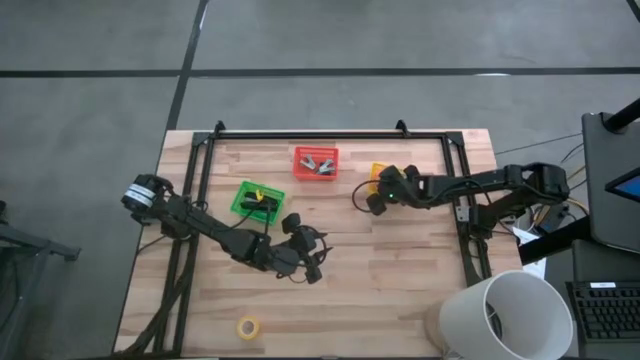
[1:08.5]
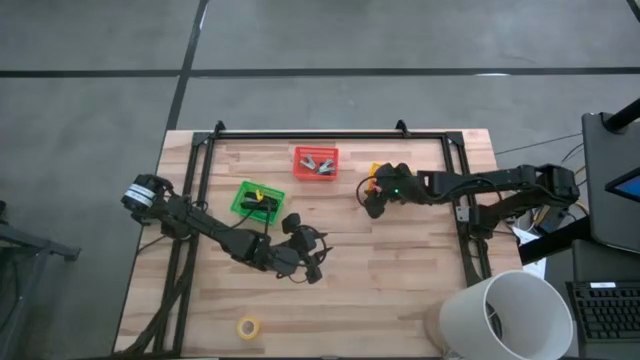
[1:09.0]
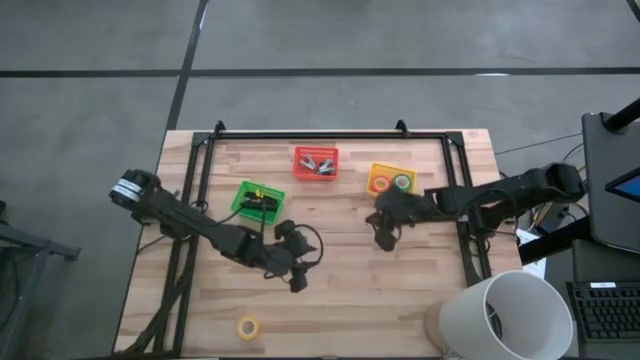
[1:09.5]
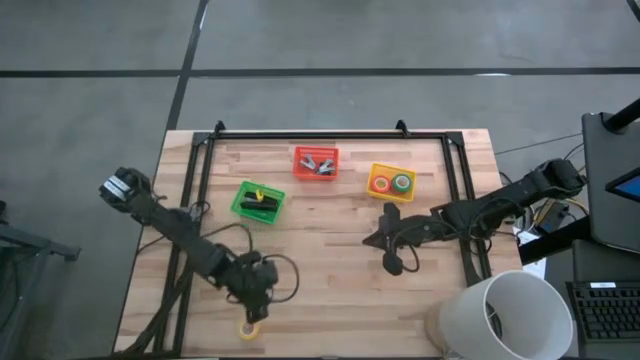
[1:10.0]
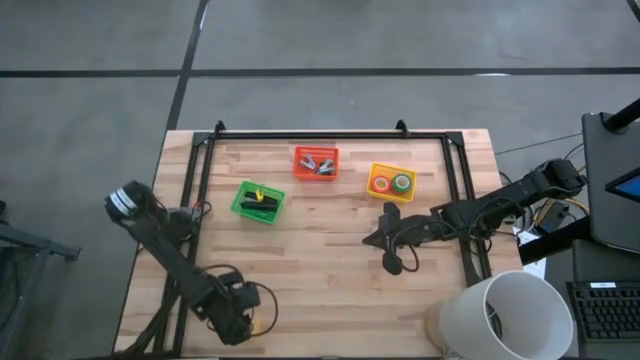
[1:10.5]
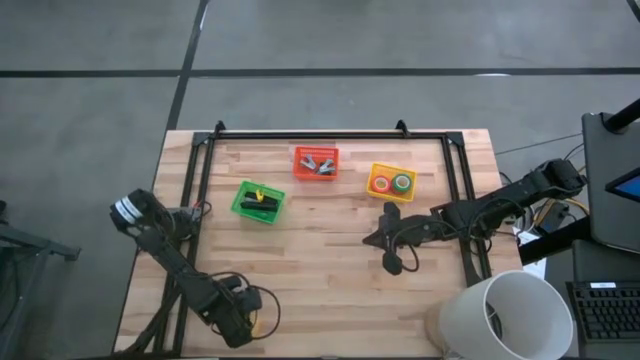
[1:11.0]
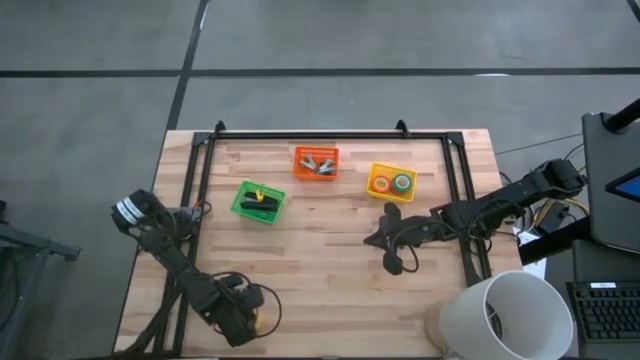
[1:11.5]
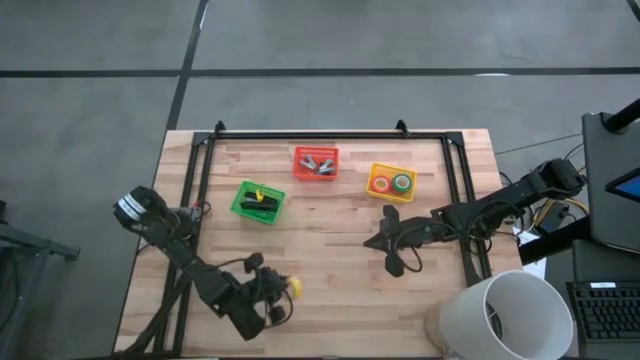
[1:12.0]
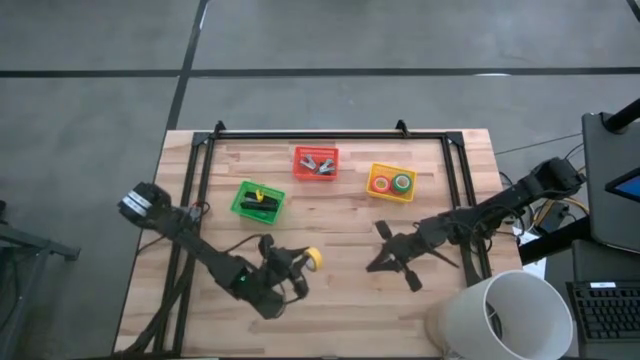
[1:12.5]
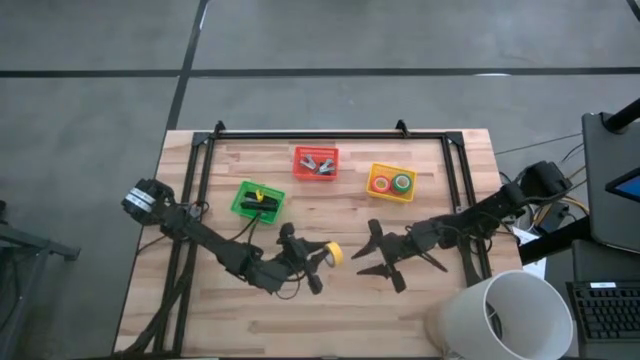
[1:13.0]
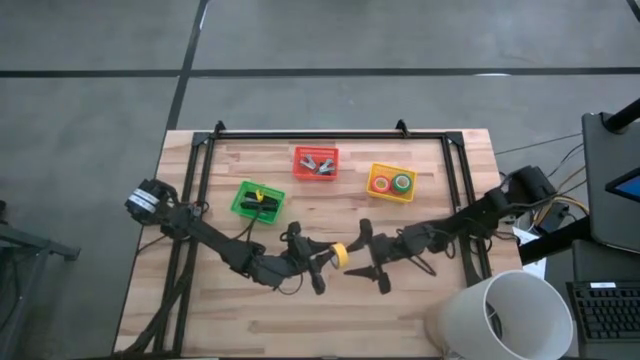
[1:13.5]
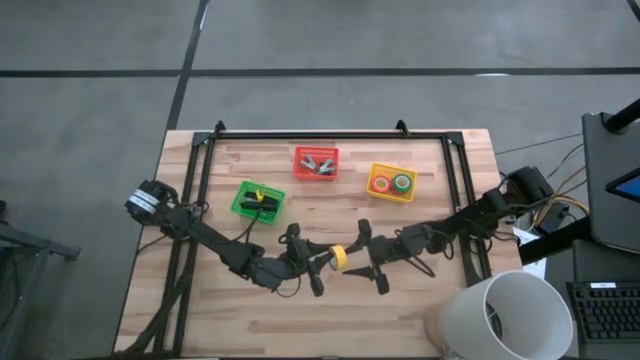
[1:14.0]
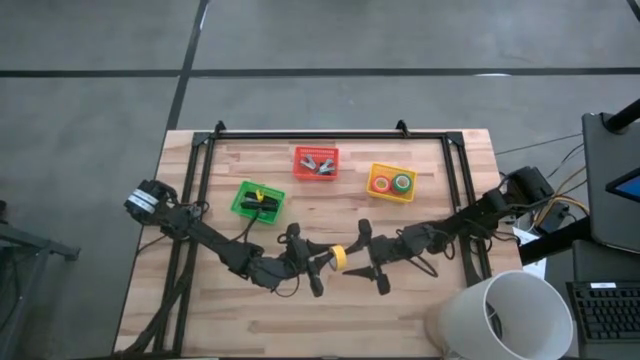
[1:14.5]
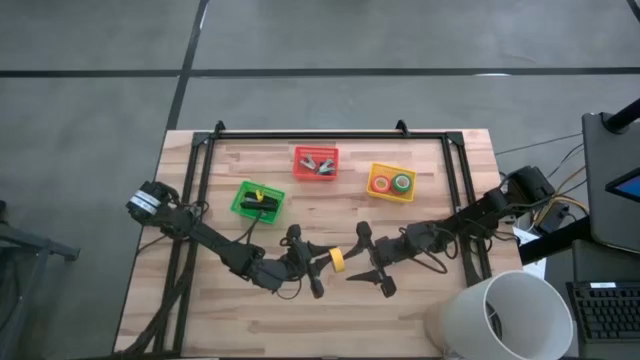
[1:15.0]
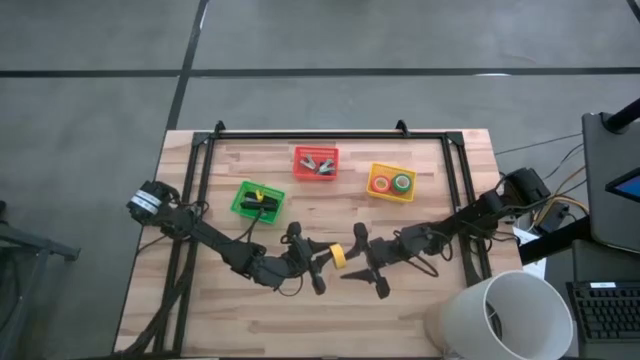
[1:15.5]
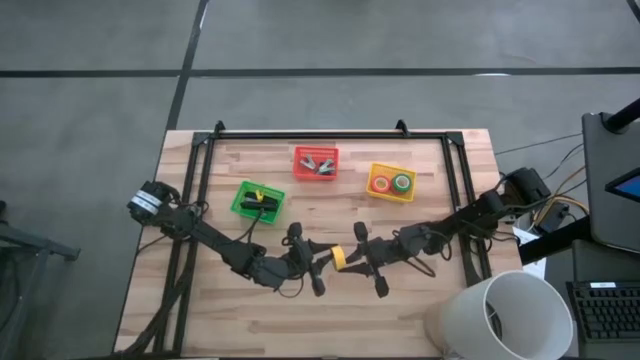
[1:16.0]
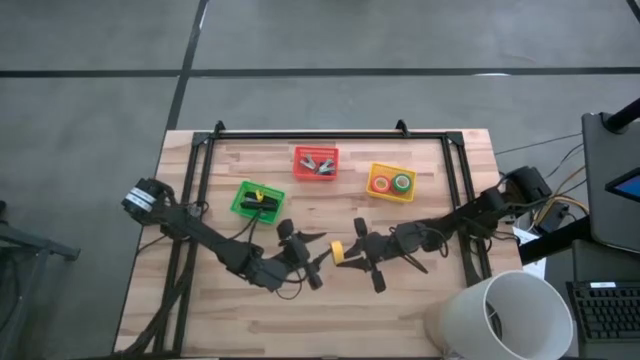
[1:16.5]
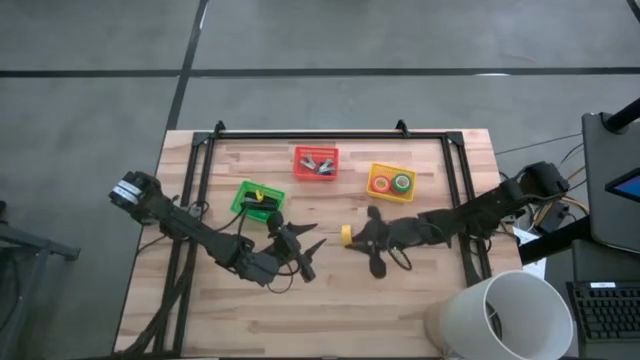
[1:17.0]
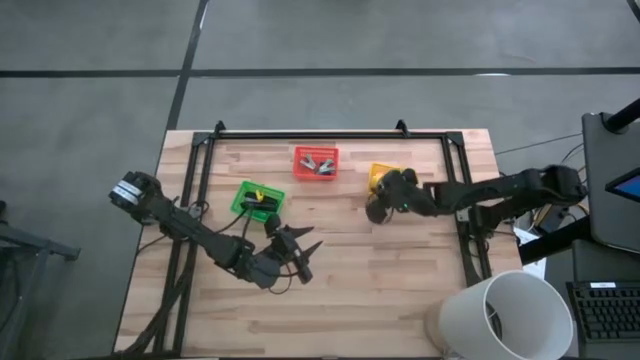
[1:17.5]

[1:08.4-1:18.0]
Task: Pick and place Stapler, Stapler remover, tape
Put the yellow tape into the yellow basket

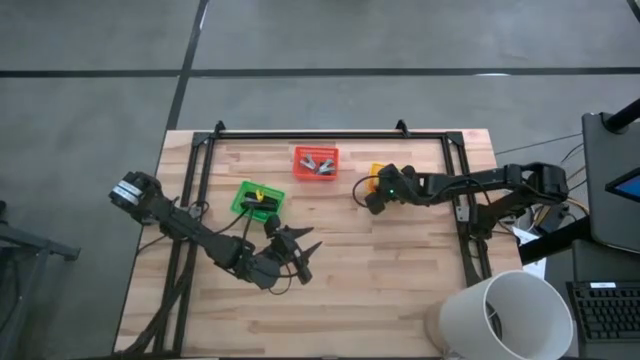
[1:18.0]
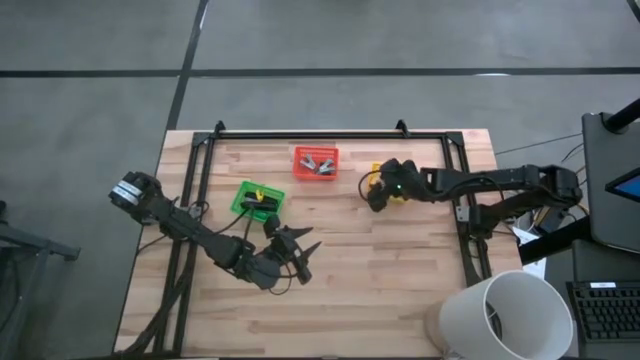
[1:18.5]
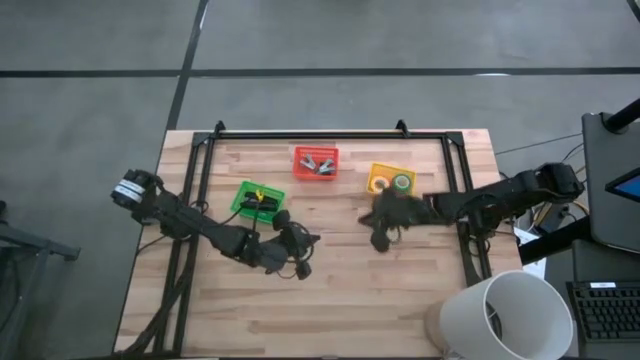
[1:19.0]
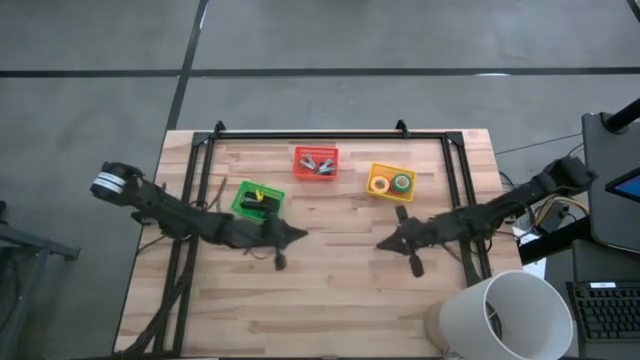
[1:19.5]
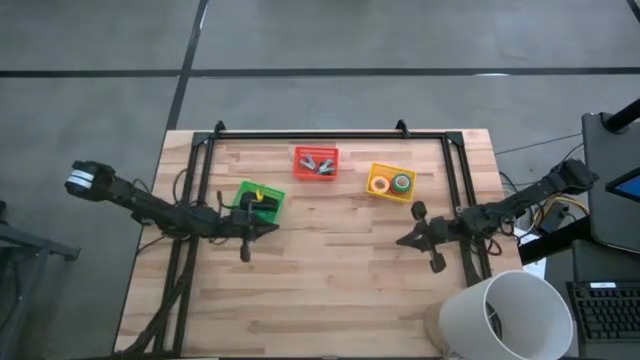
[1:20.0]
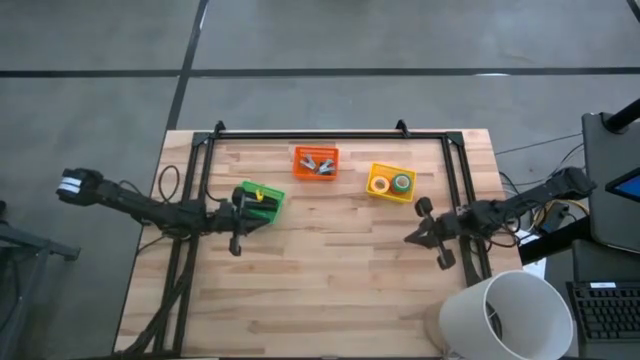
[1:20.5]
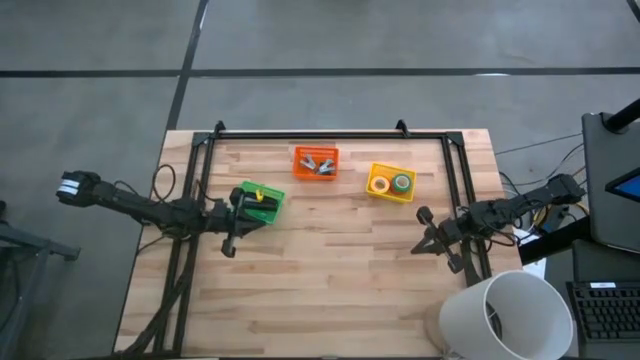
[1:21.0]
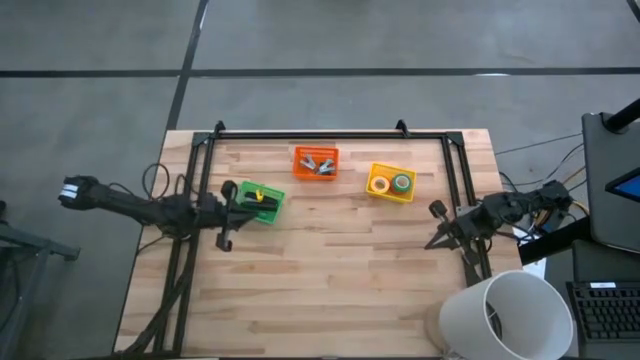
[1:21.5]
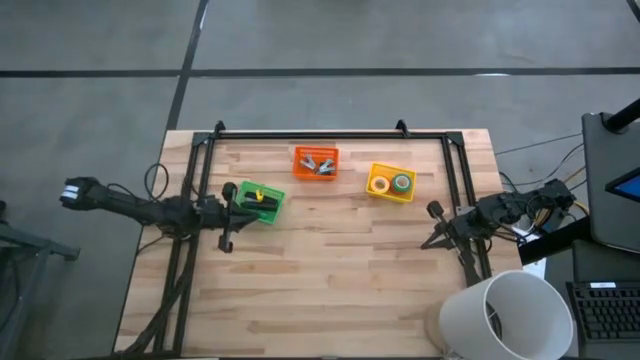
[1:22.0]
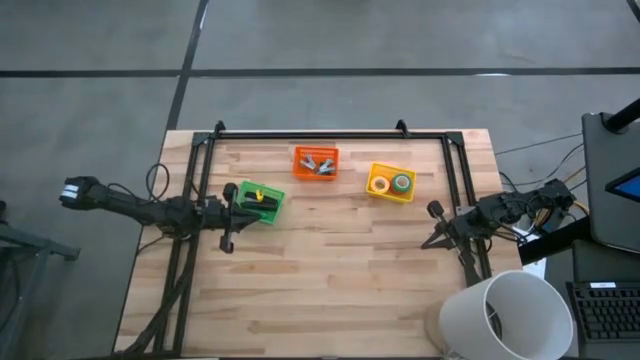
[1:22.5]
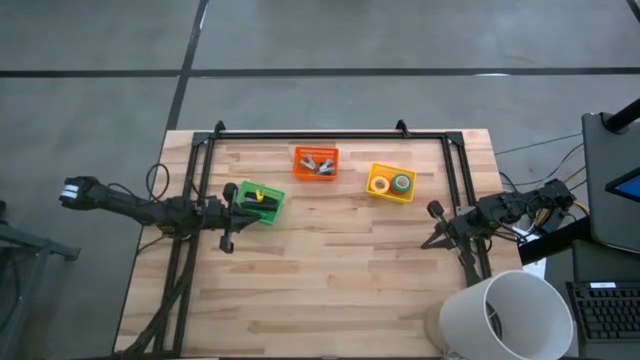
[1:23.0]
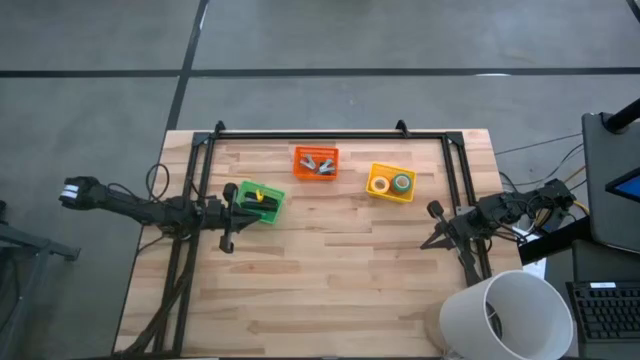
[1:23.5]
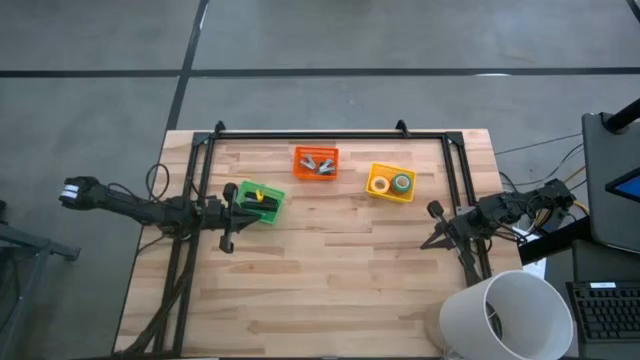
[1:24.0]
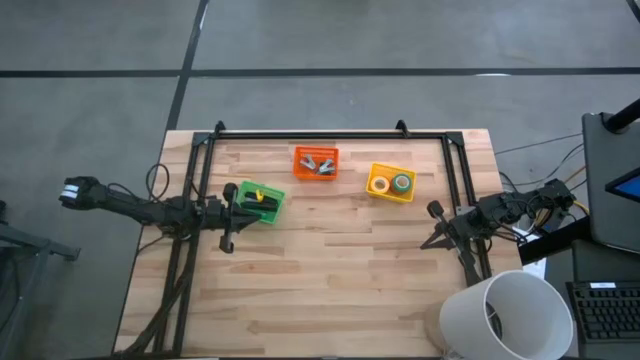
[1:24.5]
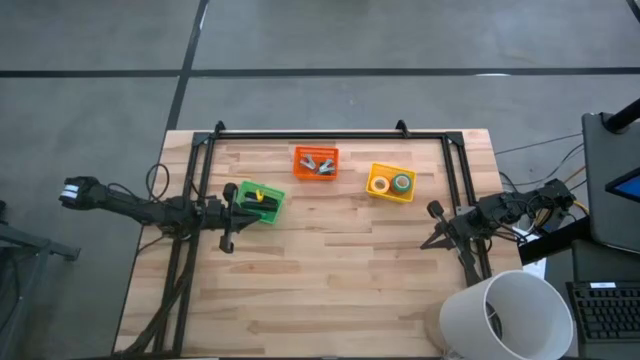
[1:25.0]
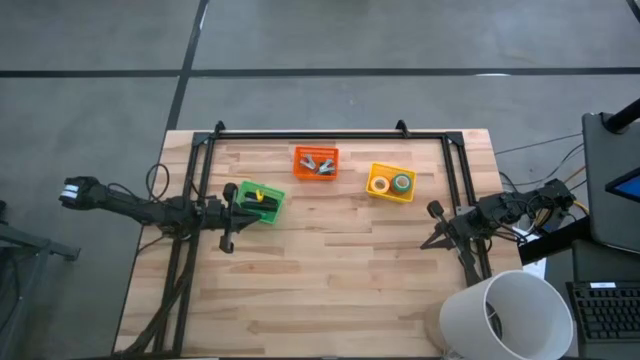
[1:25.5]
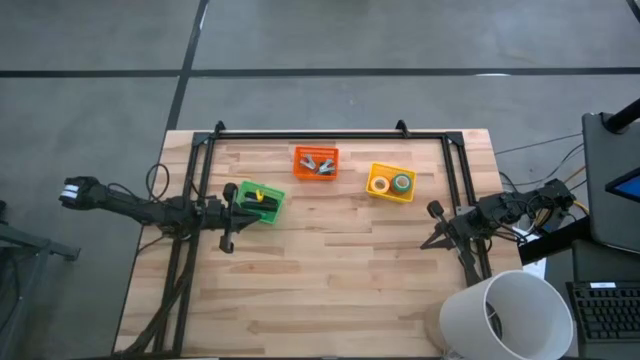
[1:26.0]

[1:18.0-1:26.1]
Return to Home Position

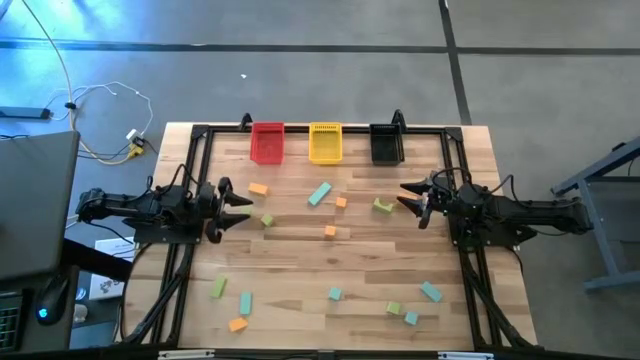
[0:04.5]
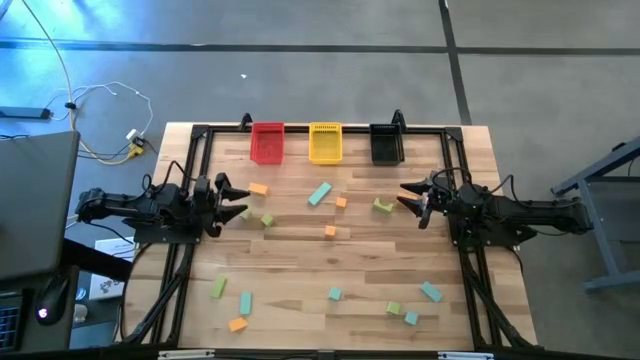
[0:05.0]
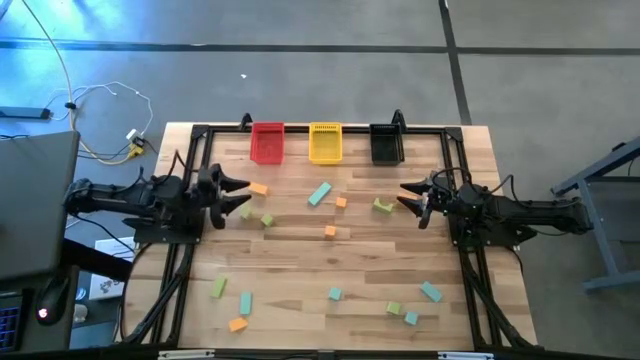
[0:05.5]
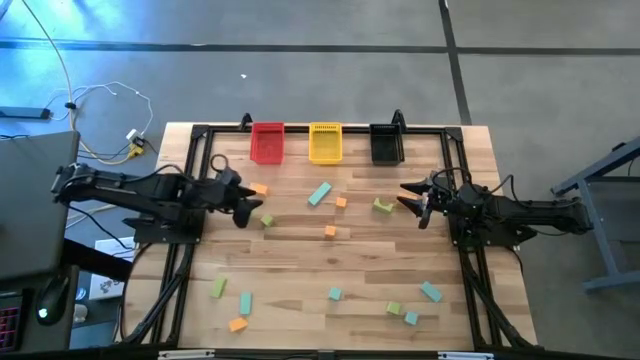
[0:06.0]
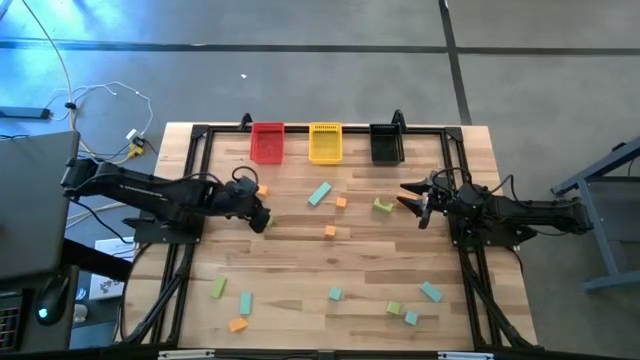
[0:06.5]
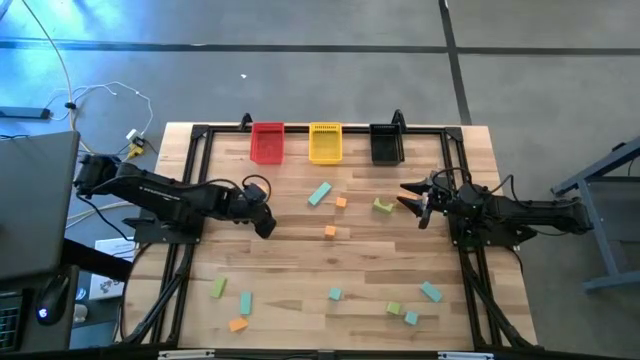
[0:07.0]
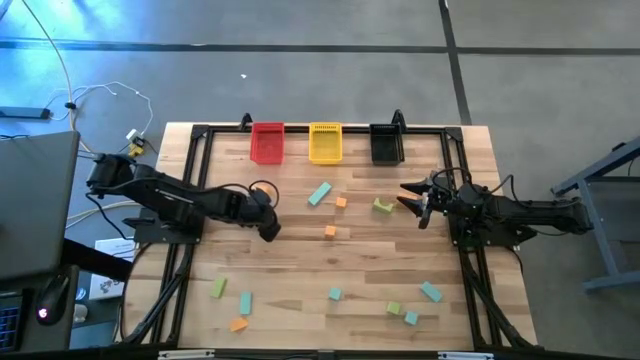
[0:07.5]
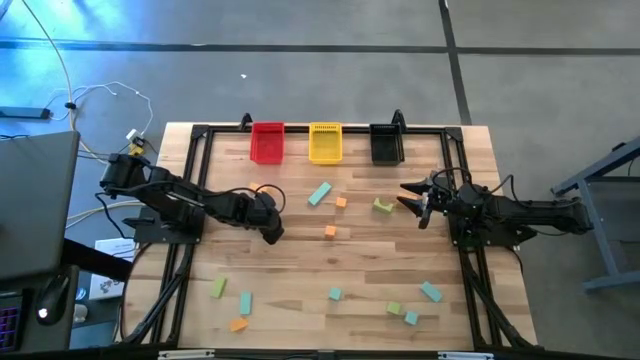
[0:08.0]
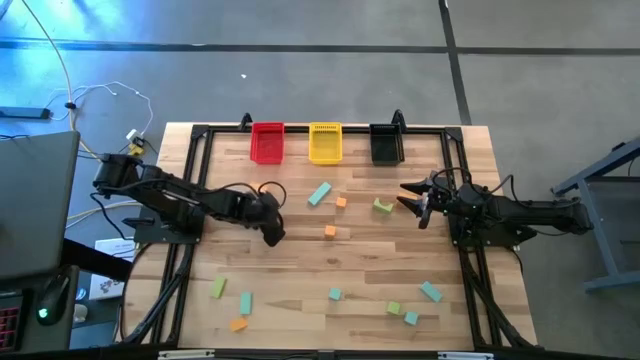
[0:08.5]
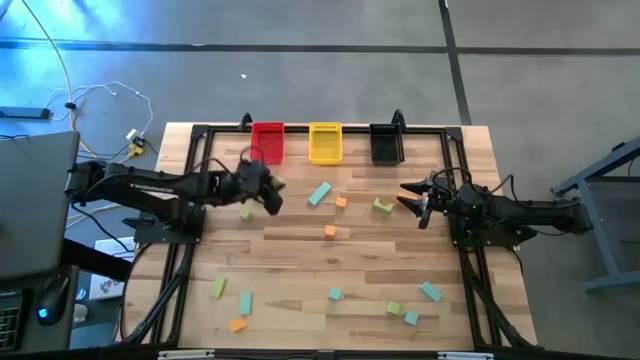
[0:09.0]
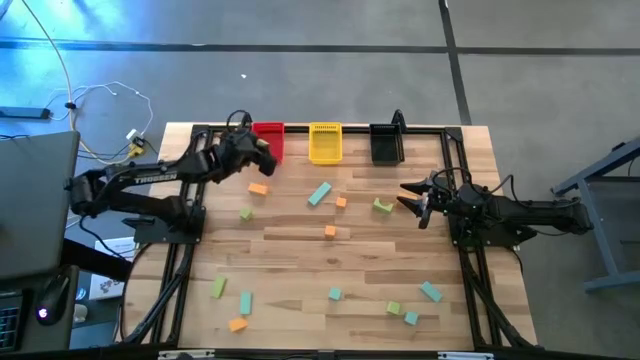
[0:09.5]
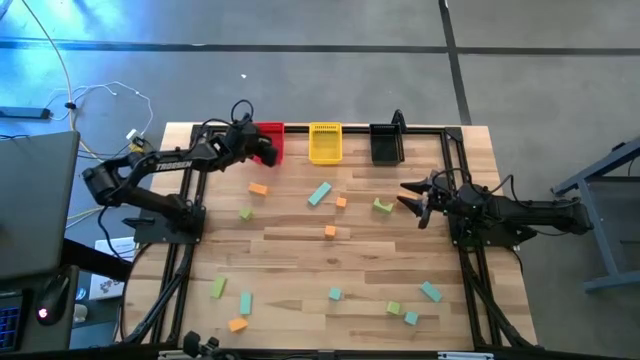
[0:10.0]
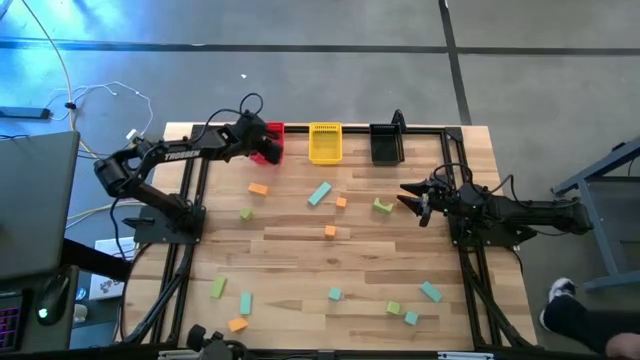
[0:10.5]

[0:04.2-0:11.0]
Task: Sort & place blocks by color
Put the green block into the red basket
